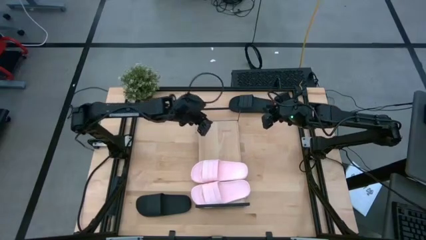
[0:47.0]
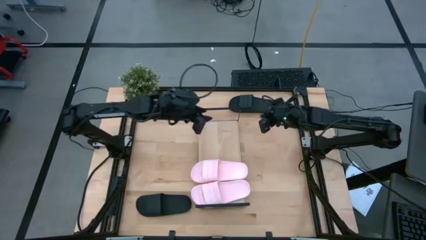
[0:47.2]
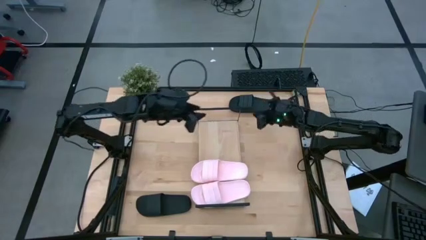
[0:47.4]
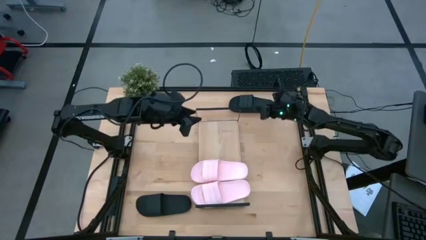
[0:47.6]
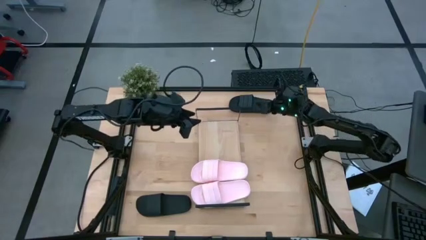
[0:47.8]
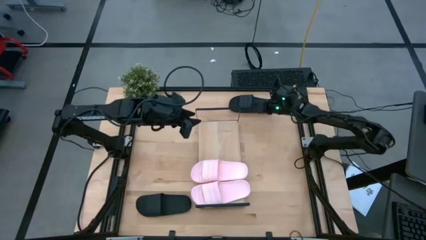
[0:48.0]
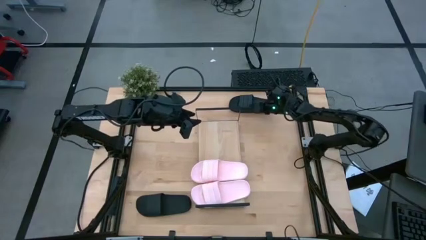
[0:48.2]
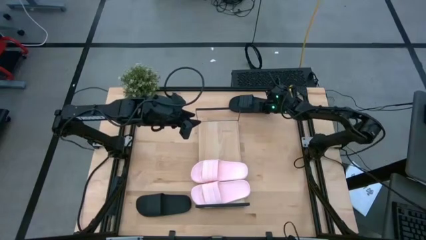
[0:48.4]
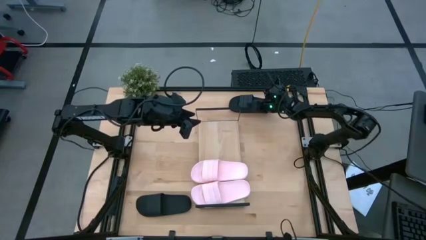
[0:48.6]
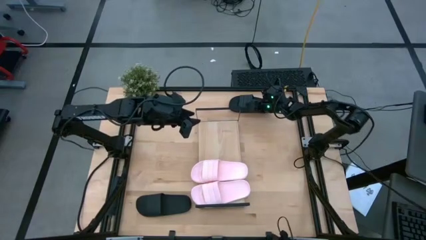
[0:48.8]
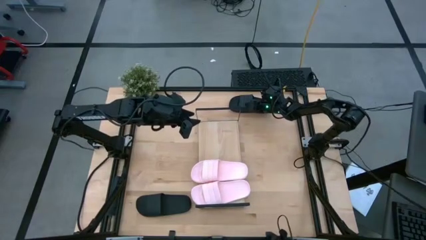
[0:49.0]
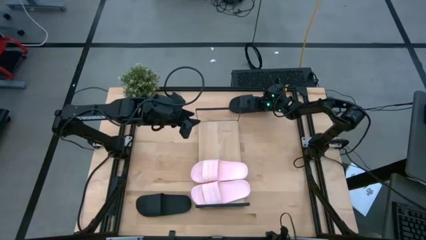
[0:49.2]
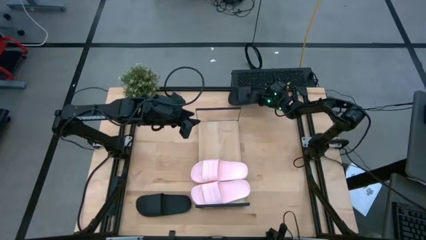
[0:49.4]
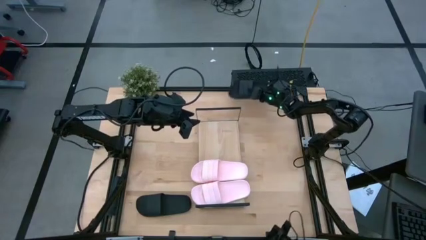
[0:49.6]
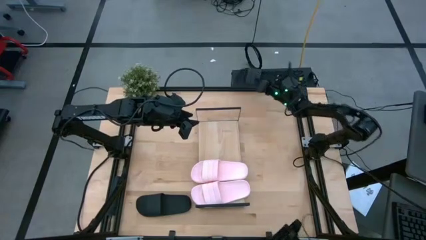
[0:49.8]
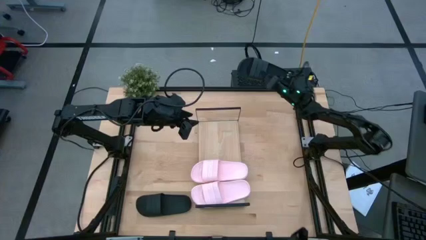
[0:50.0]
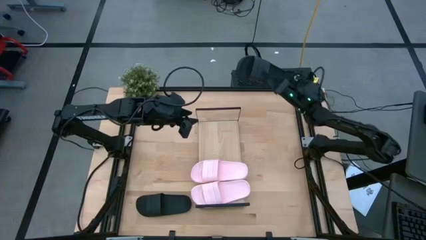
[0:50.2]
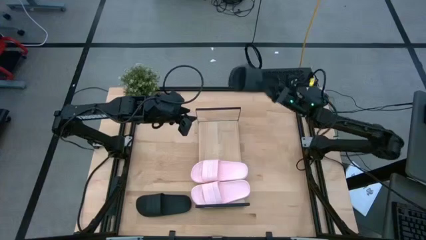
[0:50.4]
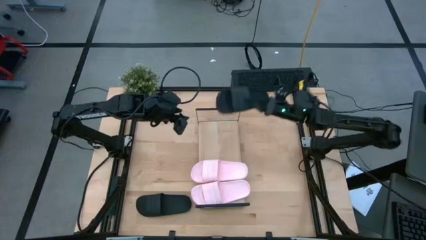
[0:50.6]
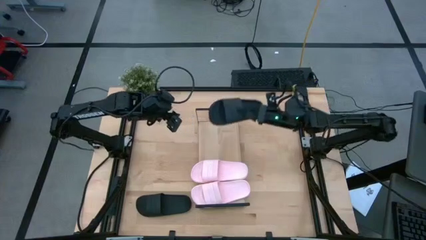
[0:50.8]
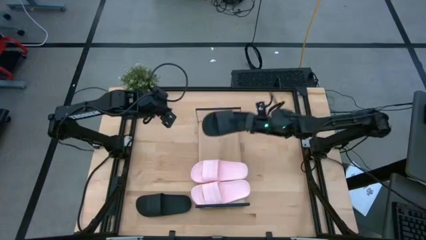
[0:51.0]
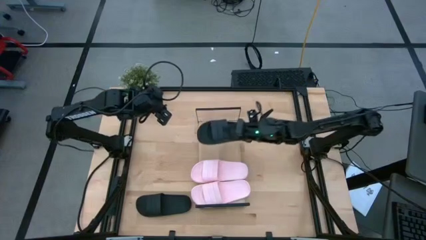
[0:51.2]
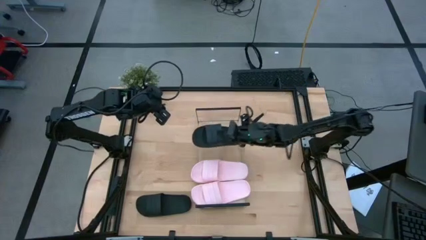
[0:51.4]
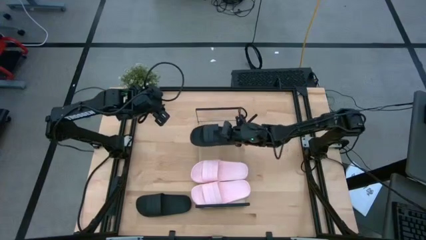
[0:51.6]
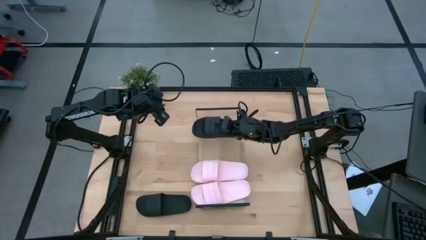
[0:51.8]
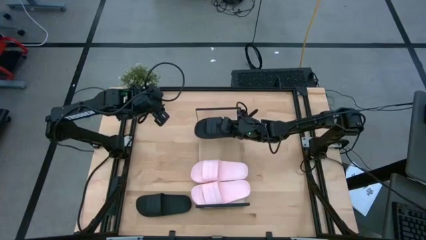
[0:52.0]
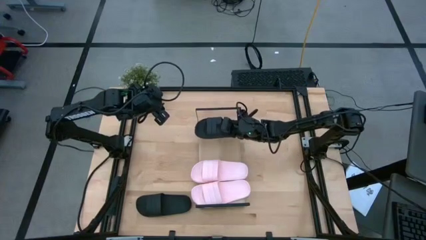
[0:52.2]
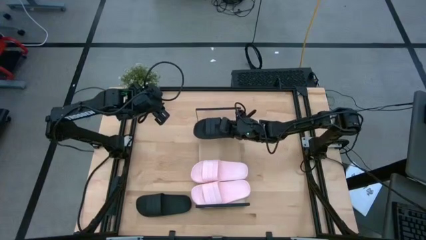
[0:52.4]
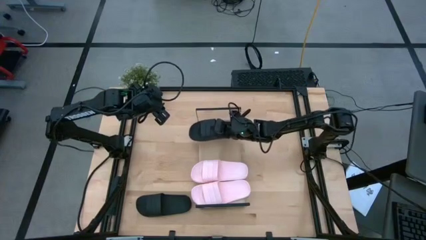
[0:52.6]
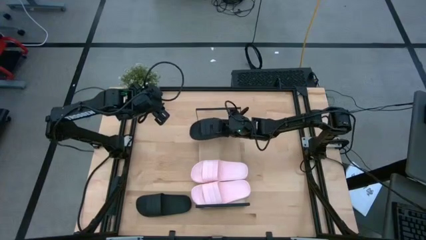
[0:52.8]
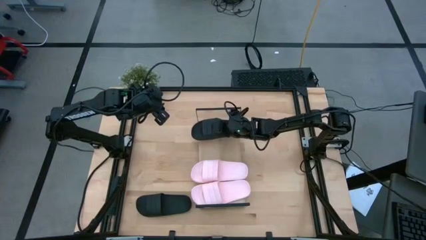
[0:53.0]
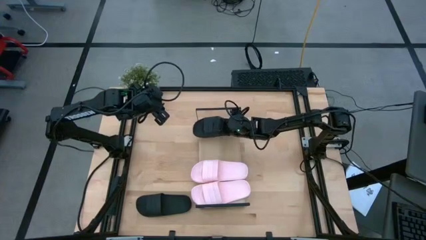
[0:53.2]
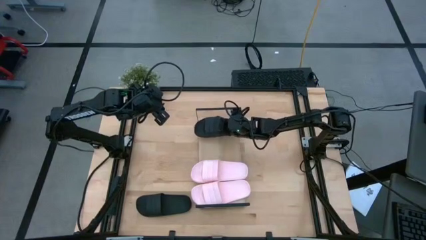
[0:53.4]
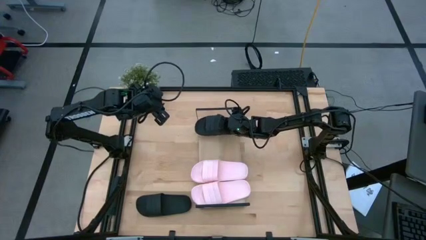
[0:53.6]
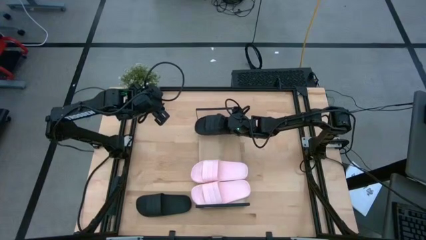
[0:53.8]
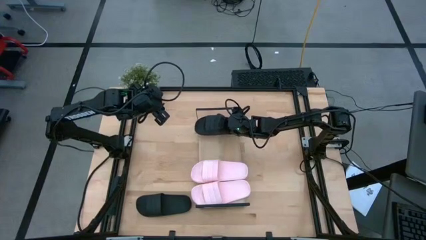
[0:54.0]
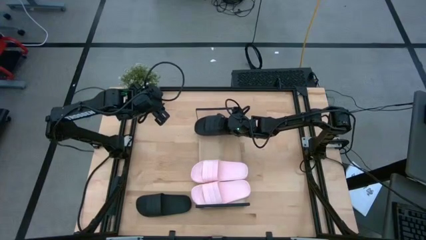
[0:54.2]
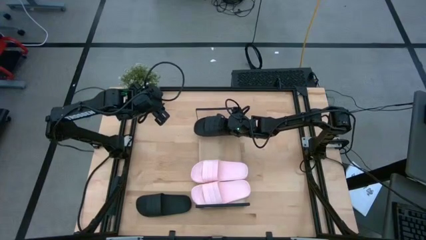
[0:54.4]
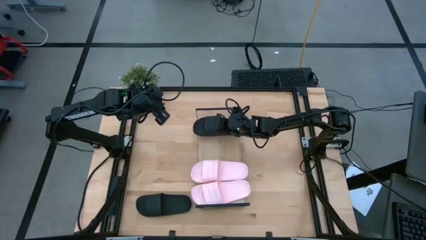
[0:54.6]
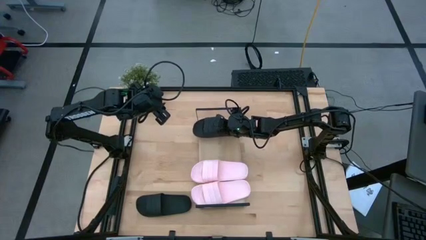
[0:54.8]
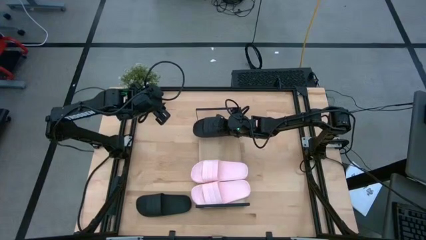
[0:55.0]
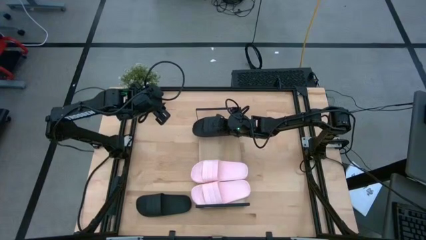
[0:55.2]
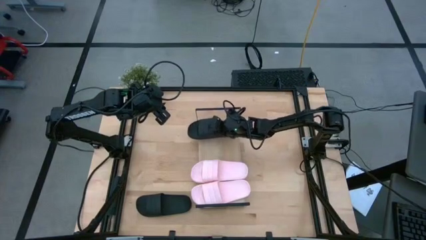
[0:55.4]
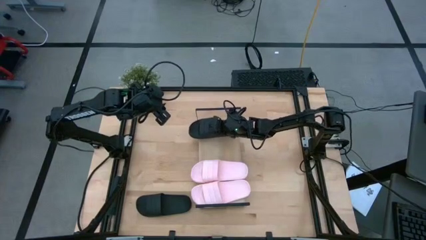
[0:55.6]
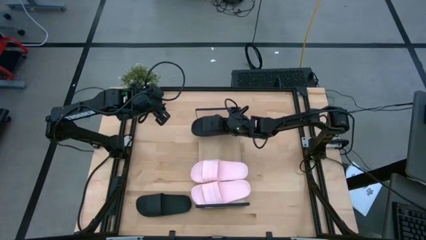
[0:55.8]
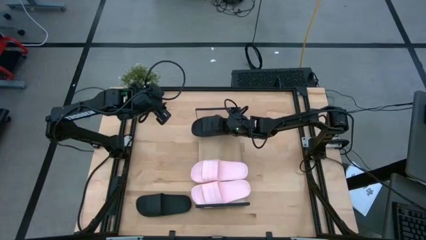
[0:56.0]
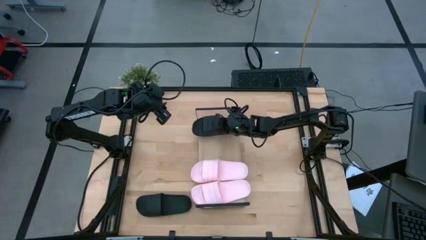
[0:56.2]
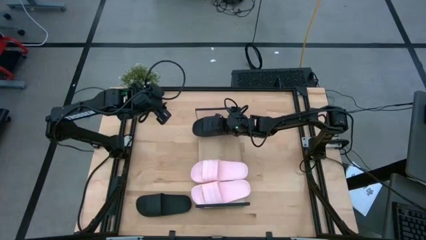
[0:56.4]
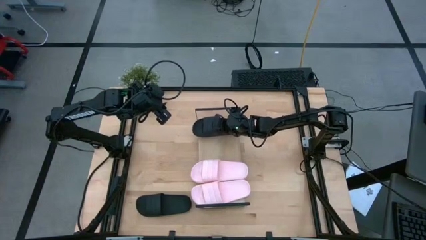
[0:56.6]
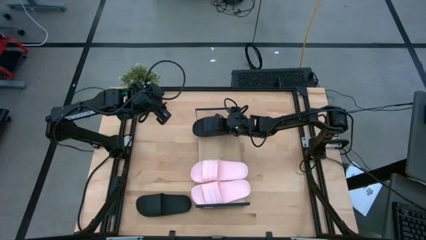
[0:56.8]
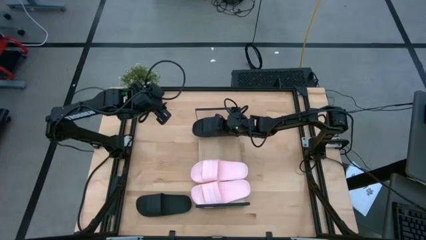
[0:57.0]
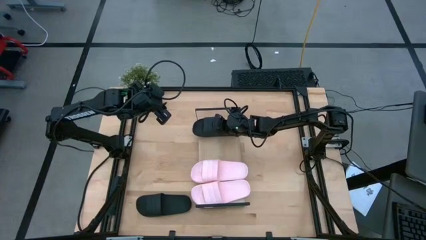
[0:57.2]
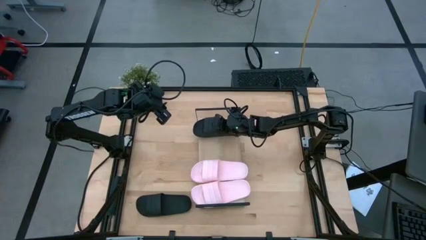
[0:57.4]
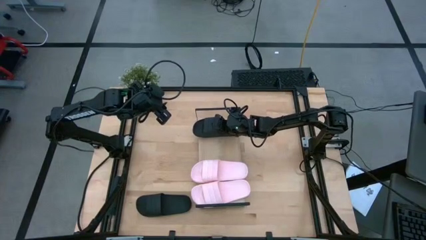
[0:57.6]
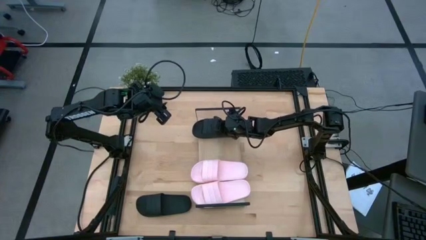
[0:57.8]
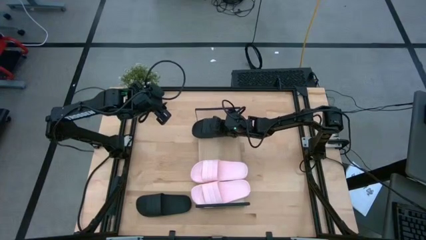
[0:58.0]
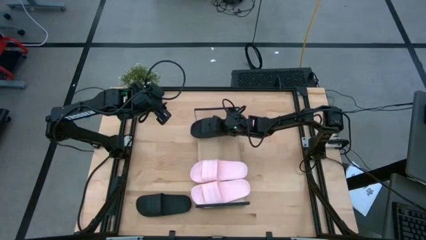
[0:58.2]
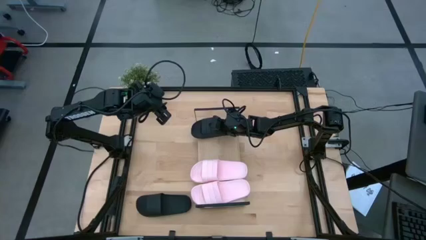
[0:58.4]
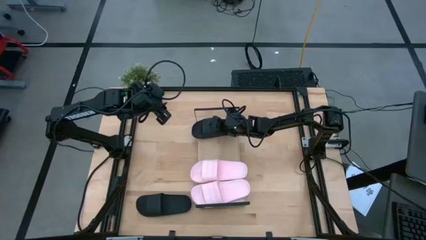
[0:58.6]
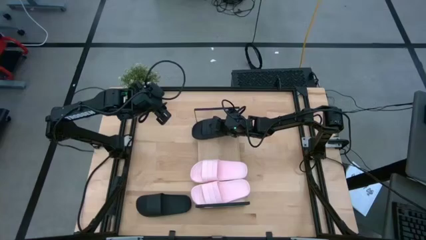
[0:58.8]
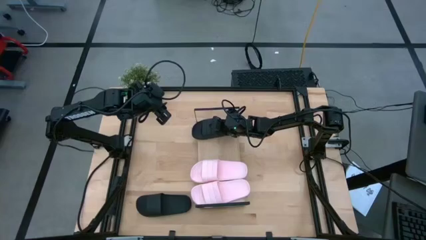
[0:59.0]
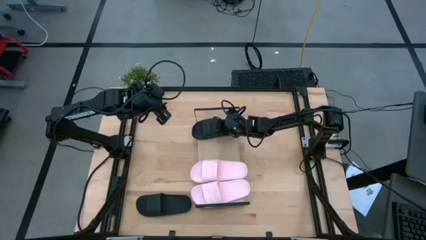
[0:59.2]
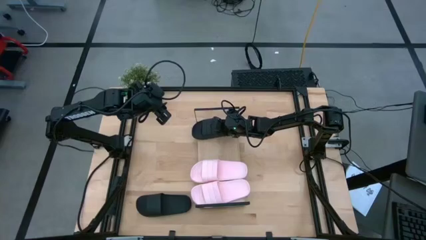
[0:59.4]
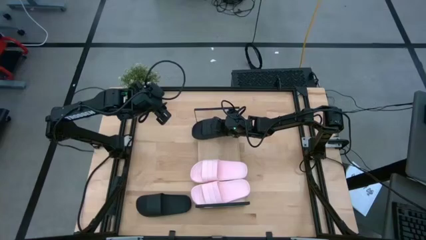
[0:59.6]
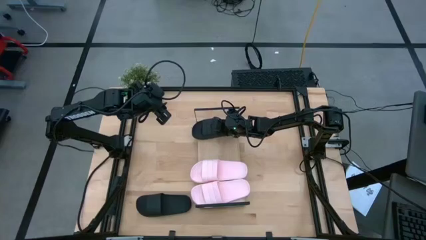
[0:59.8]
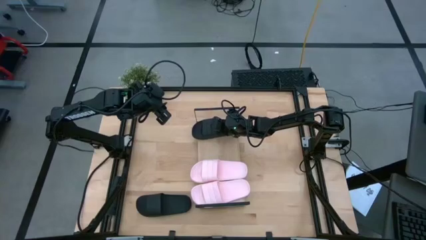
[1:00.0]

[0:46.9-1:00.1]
Task: Pick and place slides into the shelf
Put the top black slipper on the shelf
